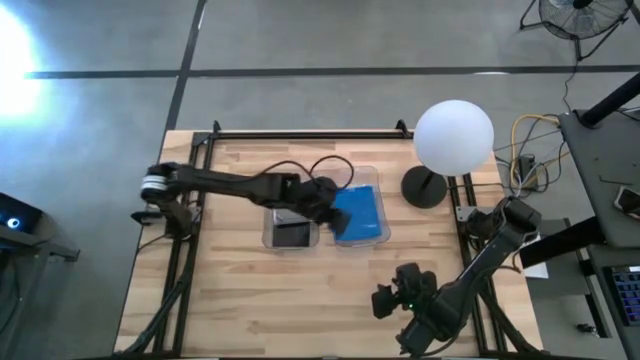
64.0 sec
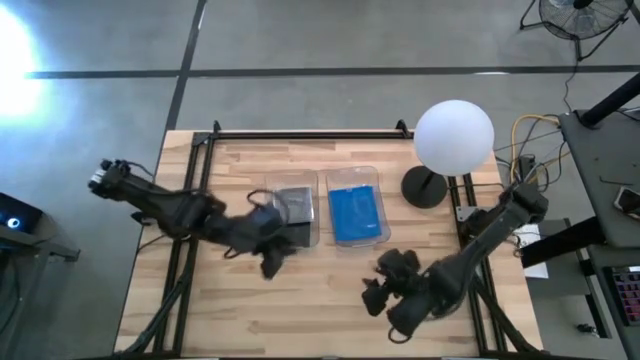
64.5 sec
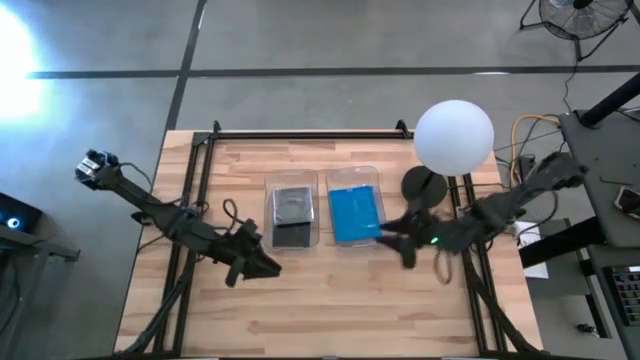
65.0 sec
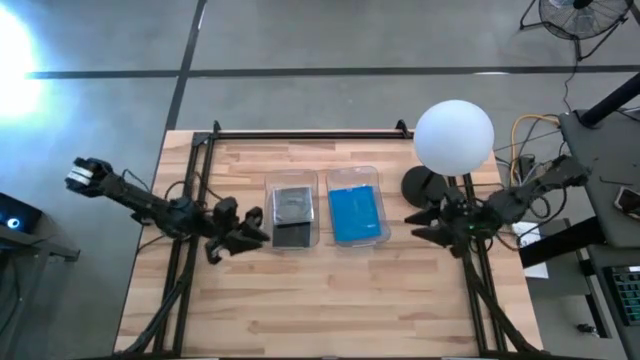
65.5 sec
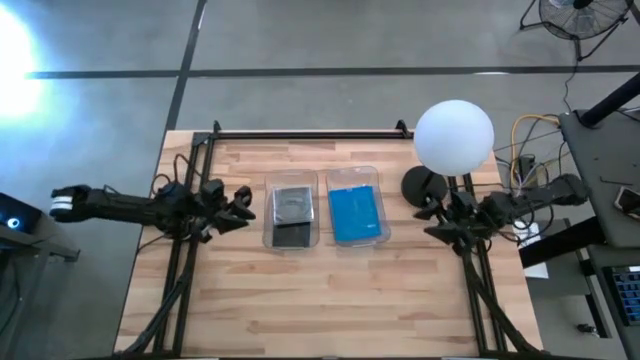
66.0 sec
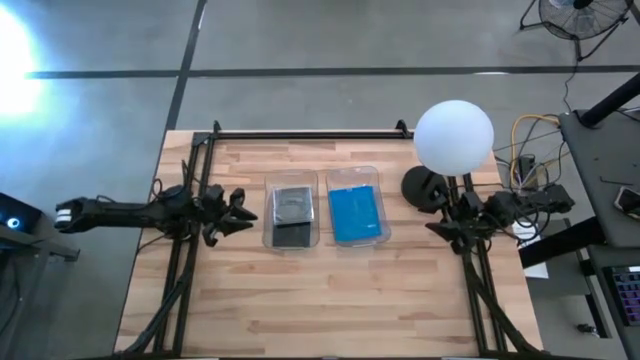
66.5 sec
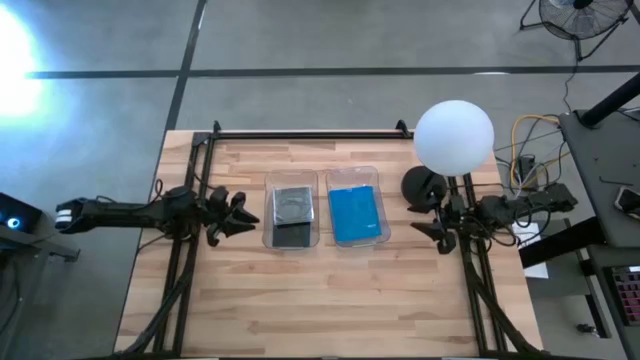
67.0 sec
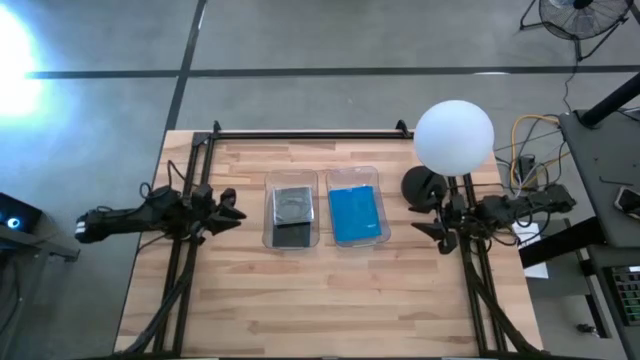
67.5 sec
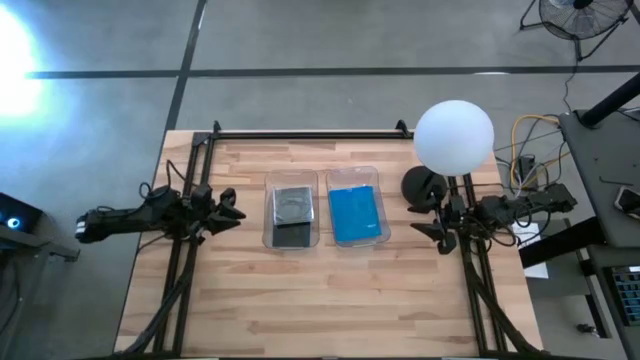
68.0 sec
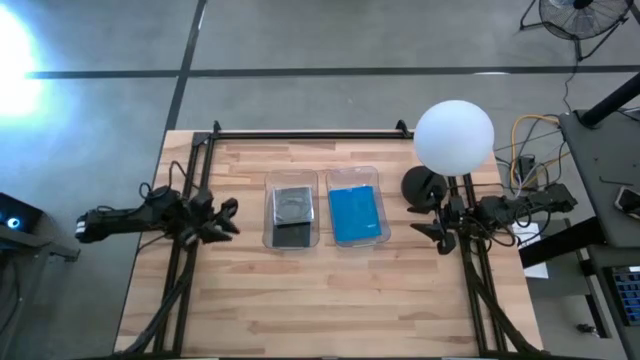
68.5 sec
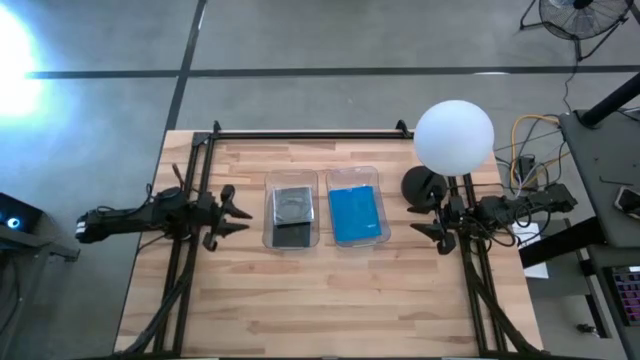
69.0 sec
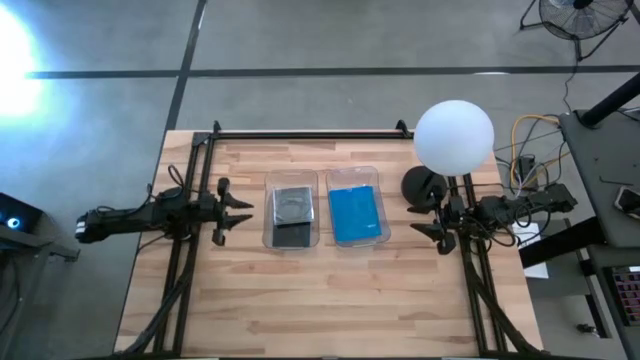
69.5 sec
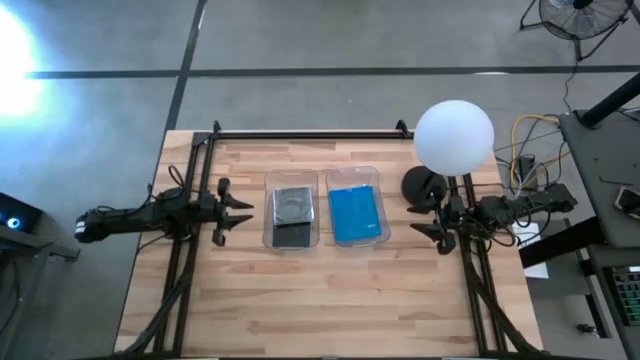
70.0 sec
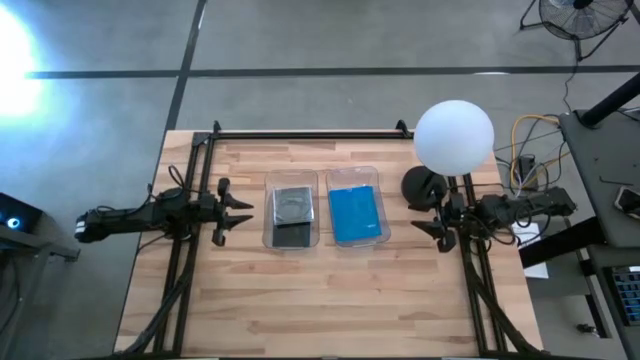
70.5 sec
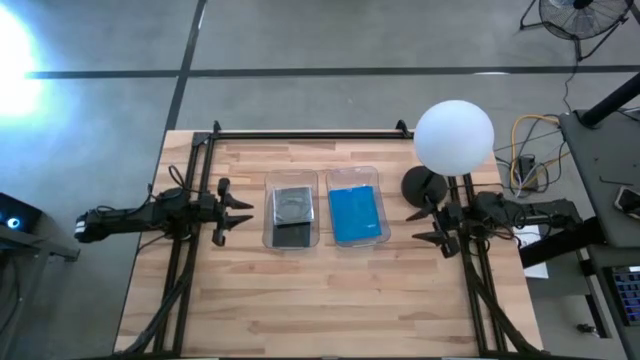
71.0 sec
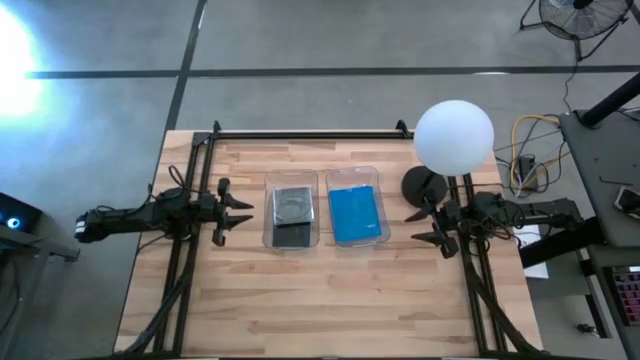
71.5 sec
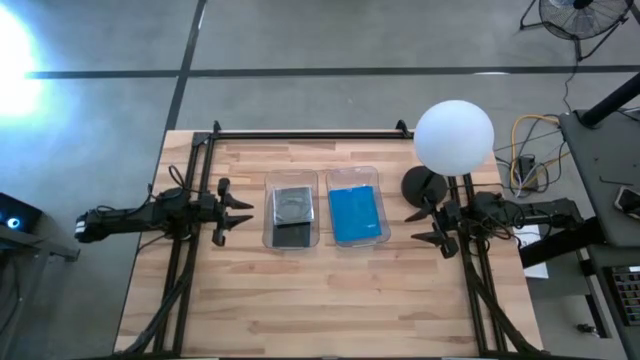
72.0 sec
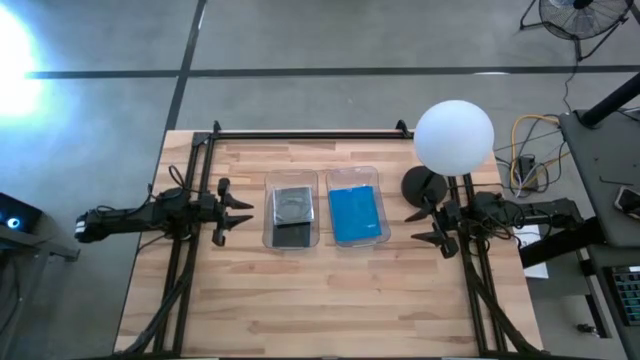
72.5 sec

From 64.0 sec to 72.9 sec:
Task: Pick & place jewel cases by type
Return to Home Position

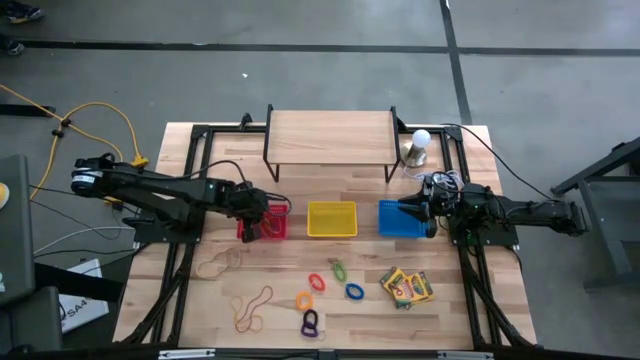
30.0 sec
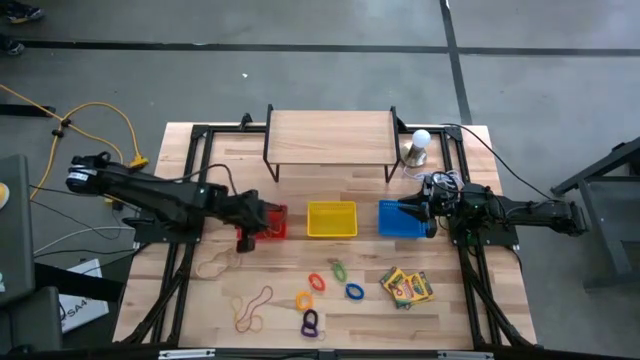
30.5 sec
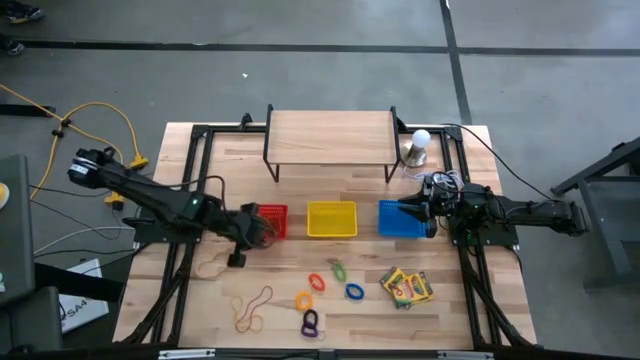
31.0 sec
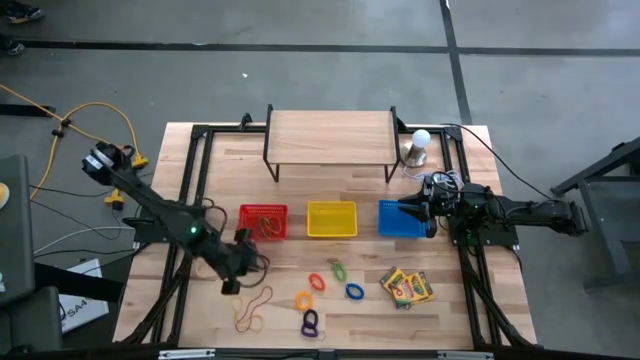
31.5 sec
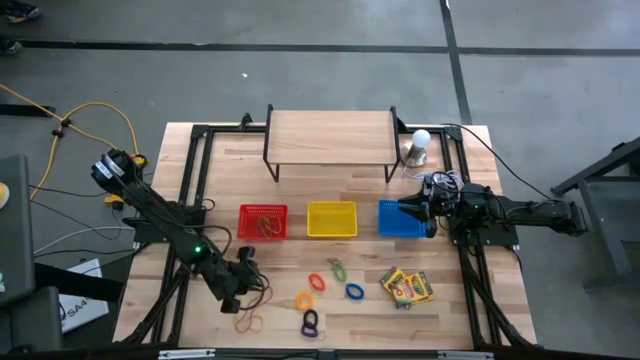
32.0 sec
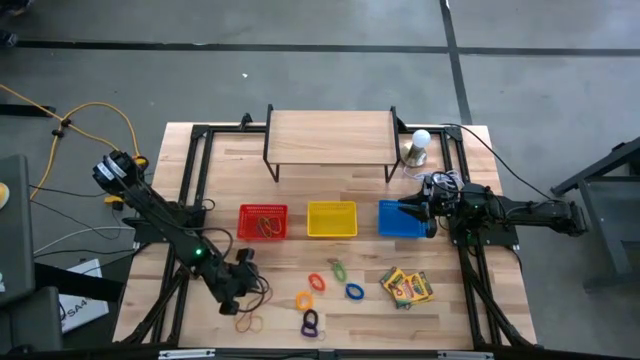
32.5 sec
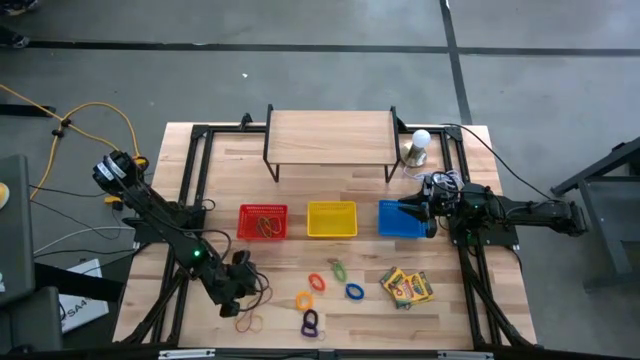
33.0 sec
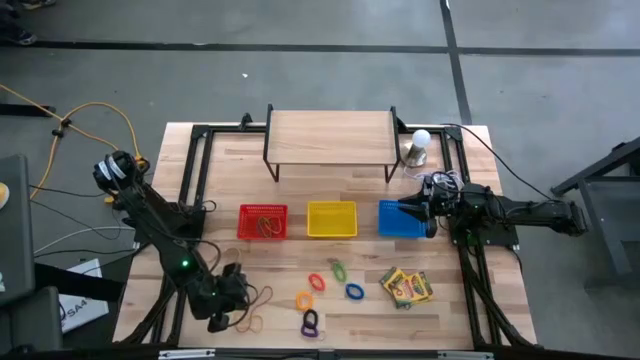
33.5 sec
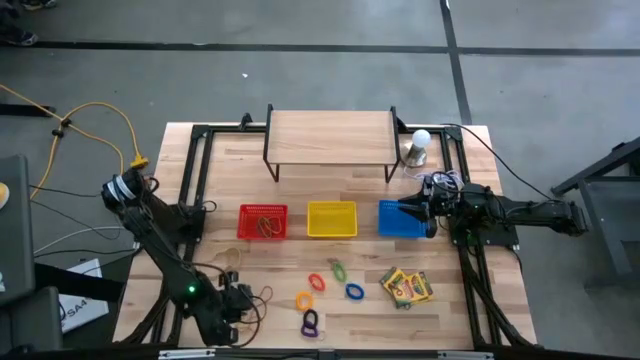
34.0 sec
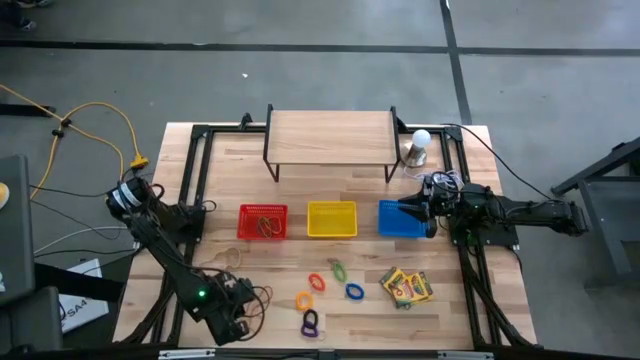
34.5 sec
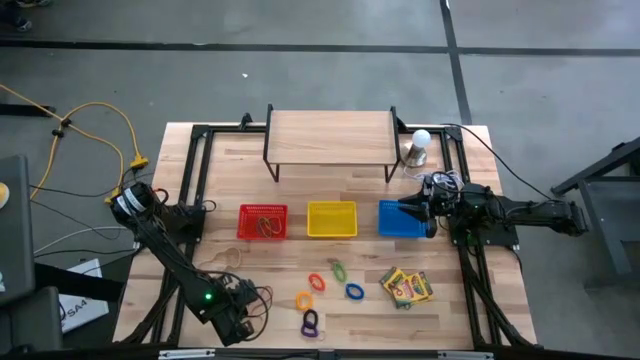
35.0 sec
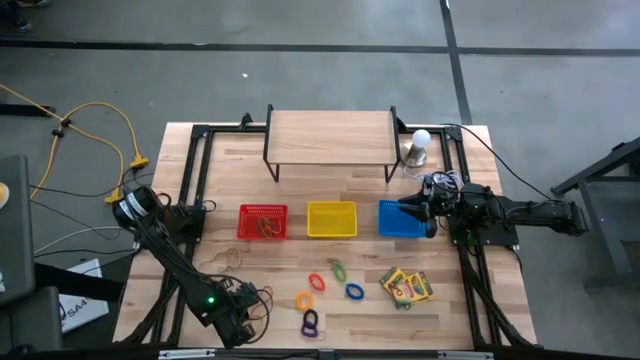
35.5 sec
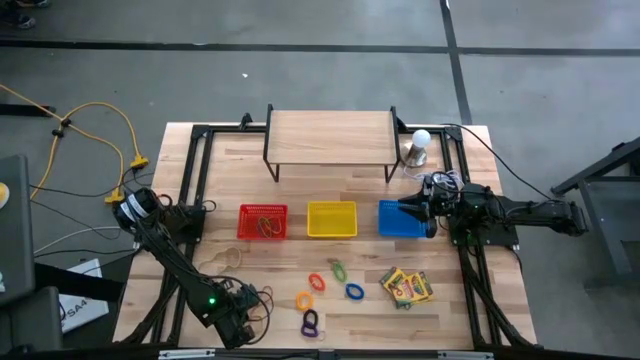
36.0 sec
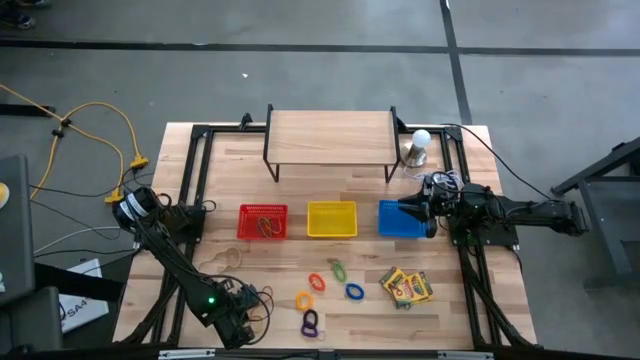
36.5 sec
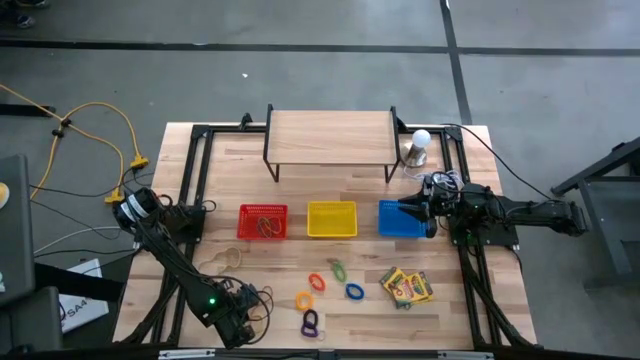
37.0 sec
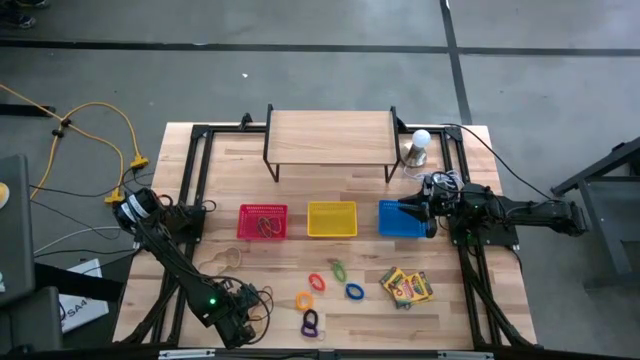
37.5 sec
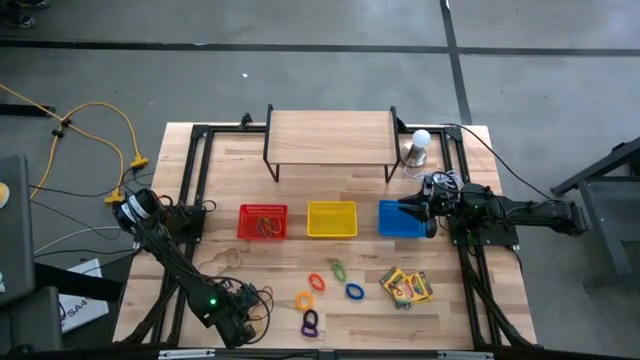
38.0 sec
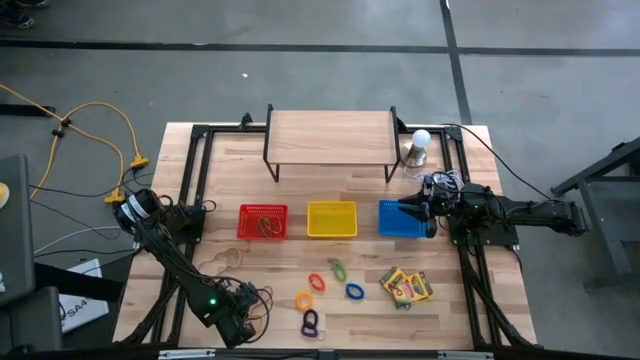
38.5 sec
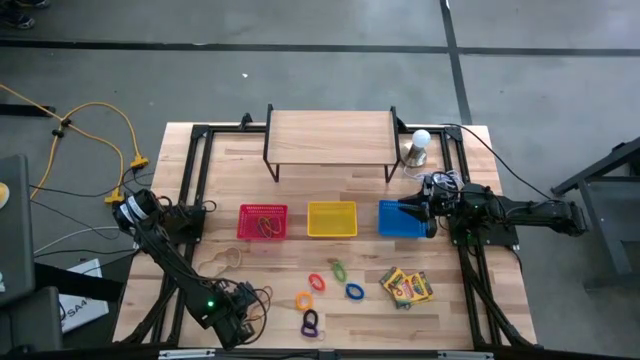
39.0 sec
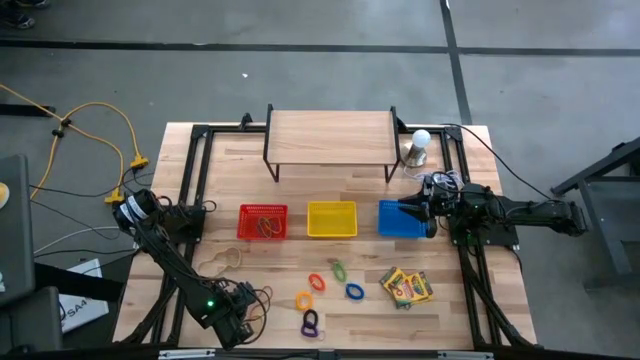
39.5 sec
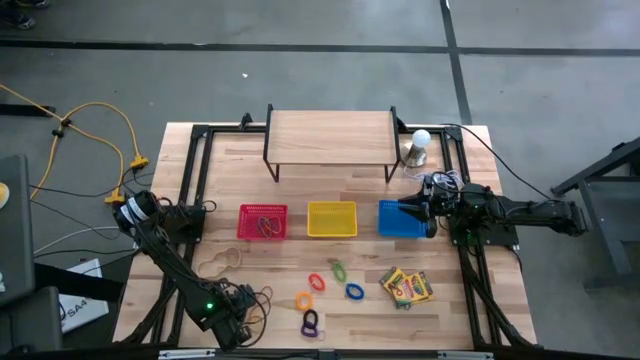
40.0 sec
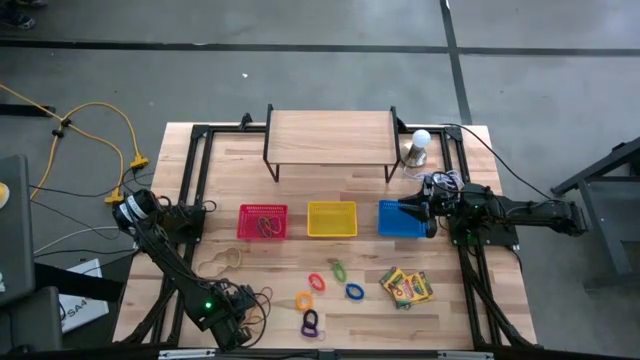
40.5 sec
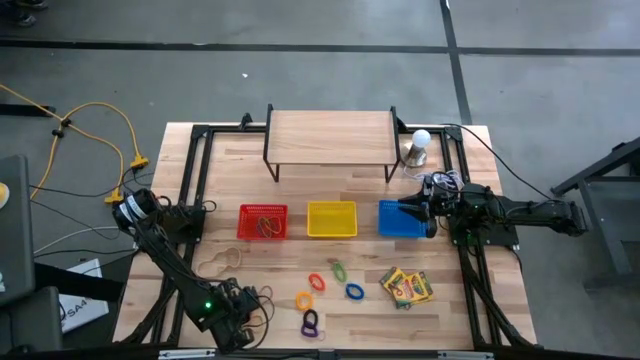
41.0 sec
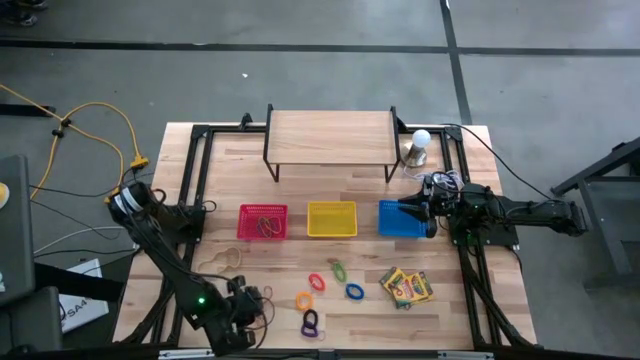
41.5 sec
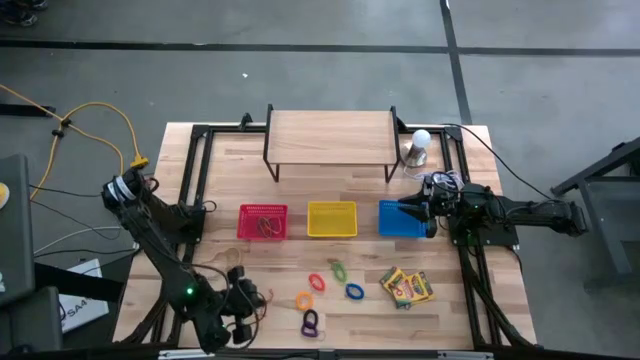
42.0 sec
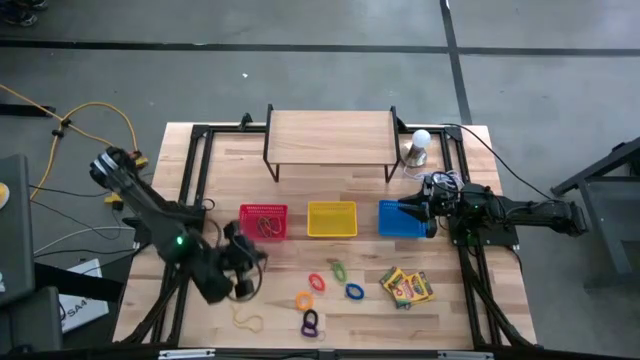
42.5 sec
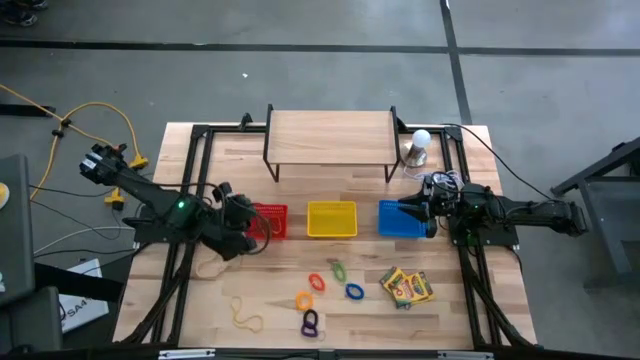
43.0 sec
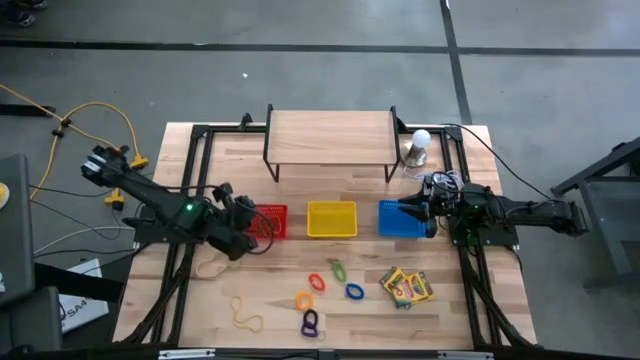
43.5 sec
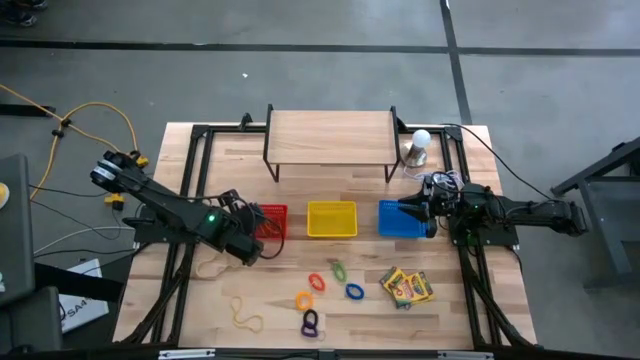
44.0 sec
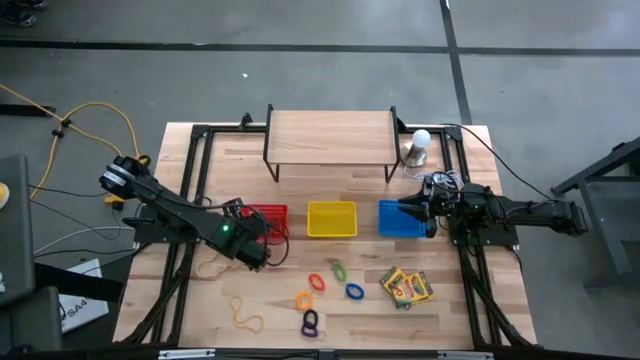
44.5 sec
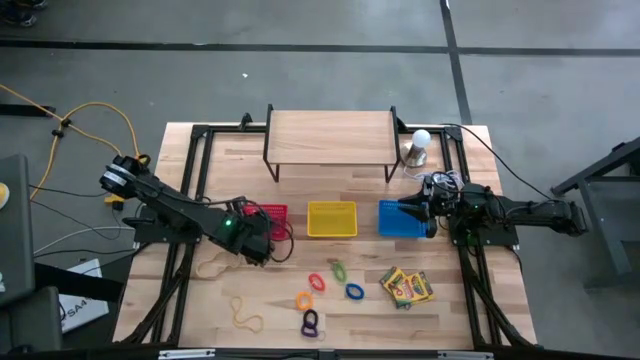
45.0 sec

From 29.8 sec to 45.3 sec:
Task: Pick & Place Office Desk Supplies
Put the red rubber band into the red bin
